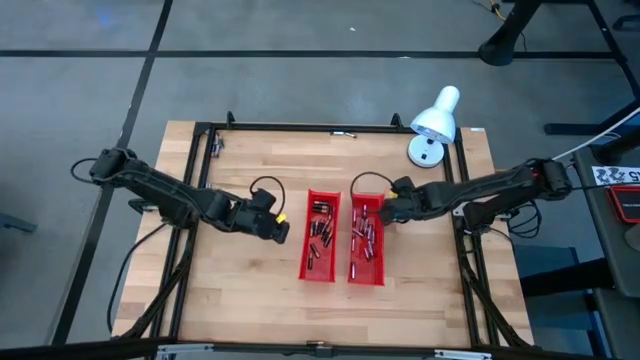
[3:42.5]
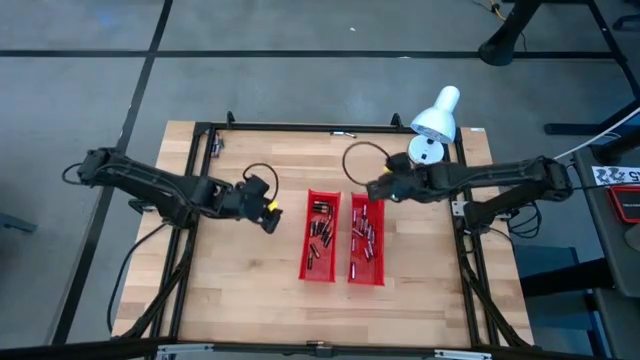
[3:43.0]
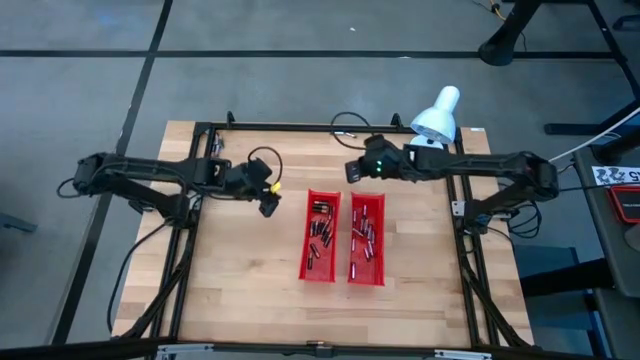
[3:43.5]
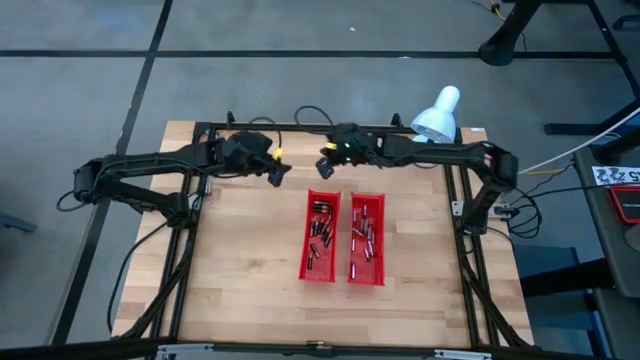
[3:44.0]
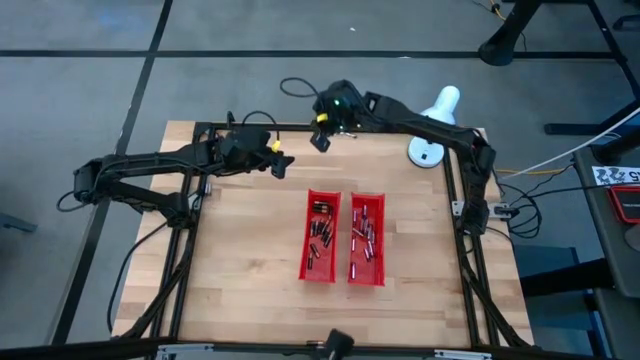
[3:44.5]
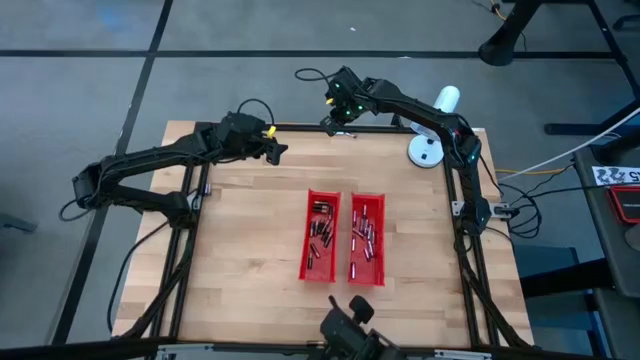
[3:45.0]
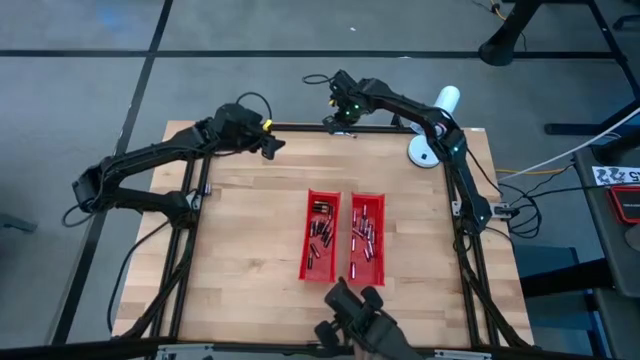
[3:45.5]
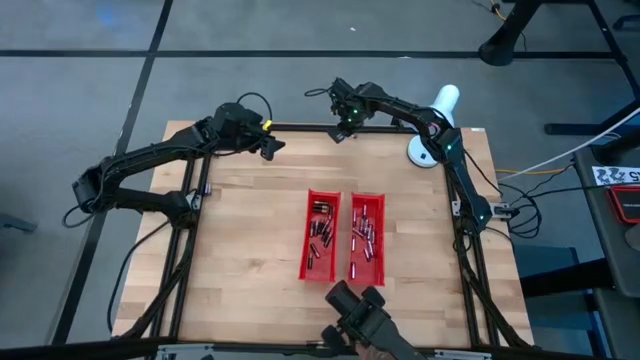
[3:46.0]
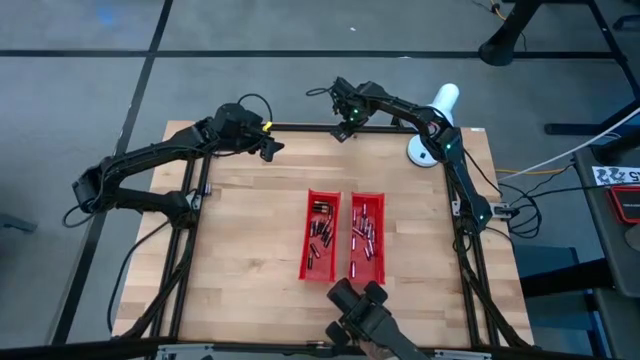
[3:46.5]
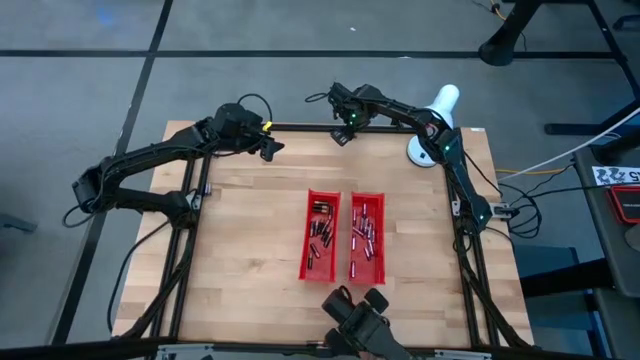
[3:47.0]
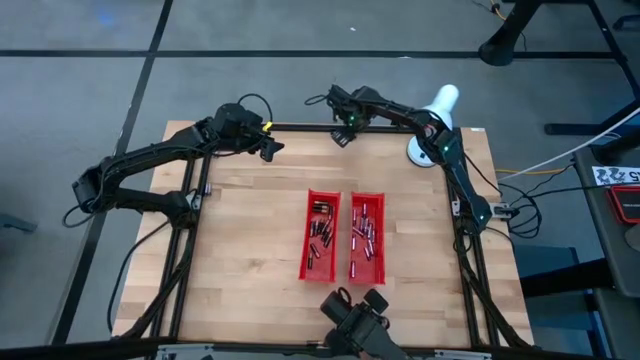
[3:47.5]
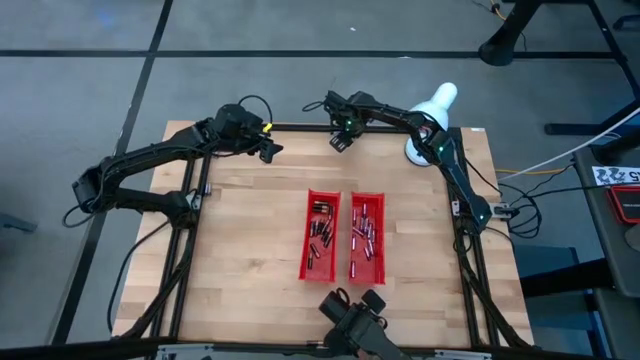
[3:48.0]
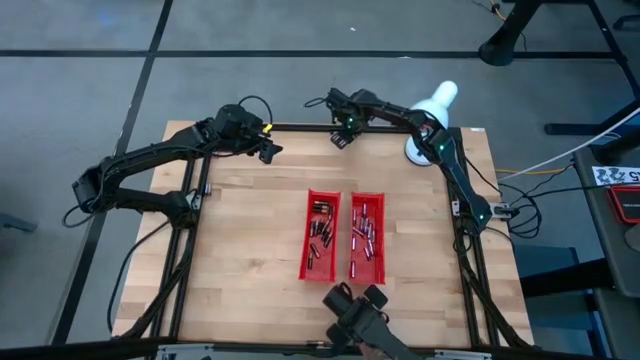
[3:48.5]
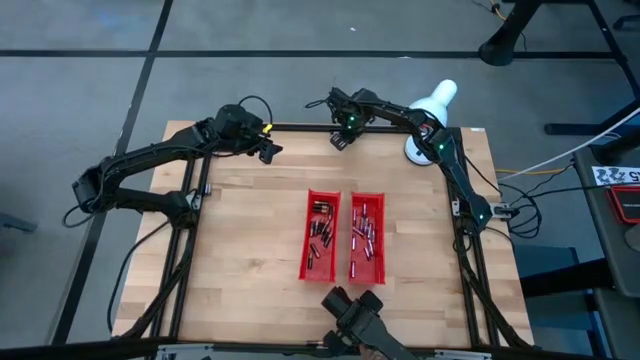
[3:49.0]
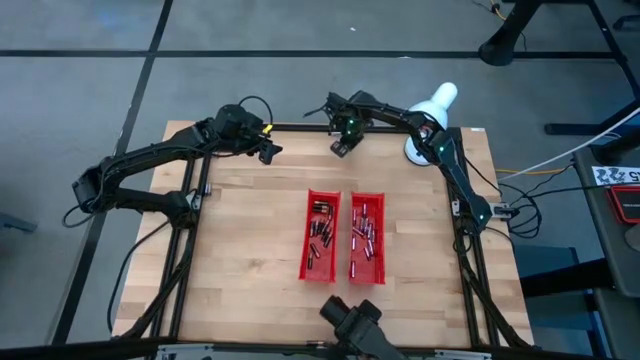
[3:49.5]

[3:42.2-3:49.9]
Task: Sort batteries
Put the silver battery into the right red bin

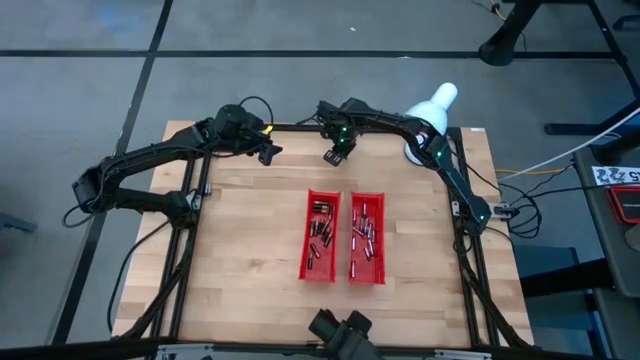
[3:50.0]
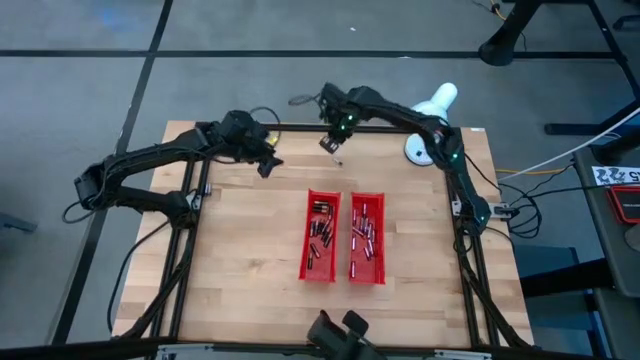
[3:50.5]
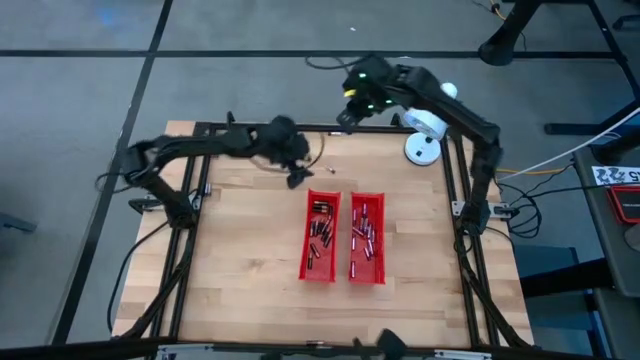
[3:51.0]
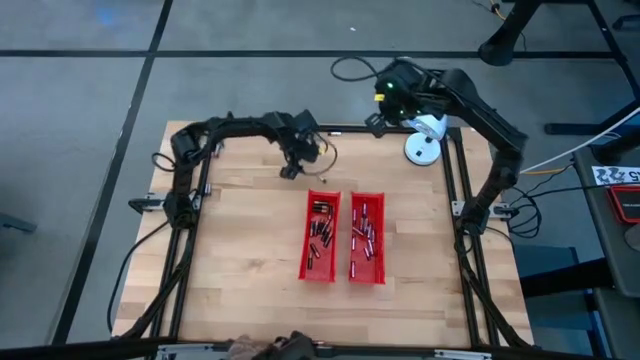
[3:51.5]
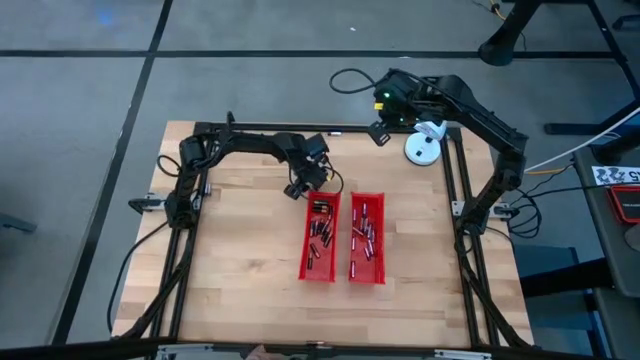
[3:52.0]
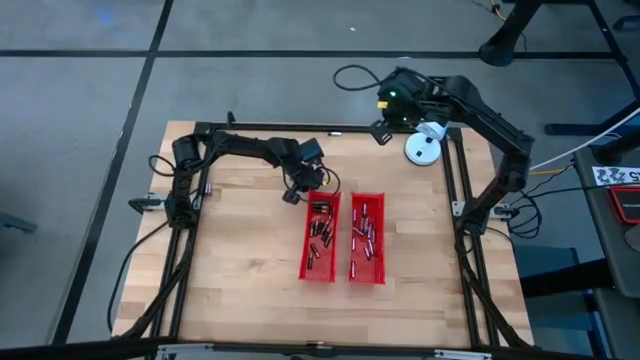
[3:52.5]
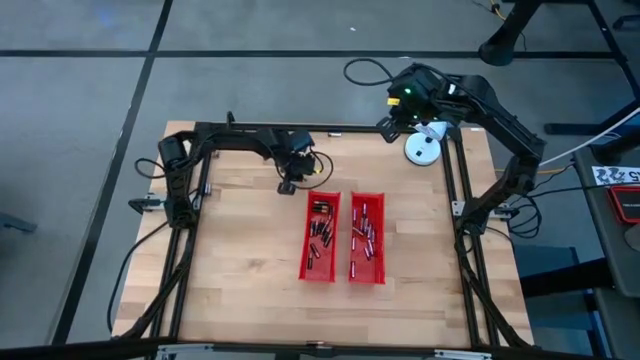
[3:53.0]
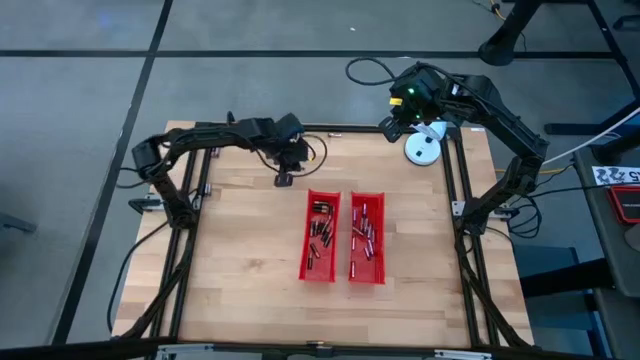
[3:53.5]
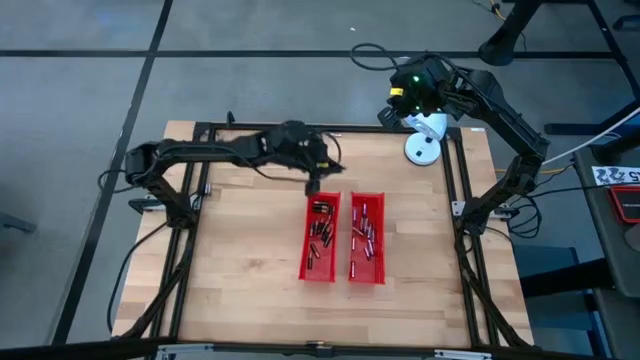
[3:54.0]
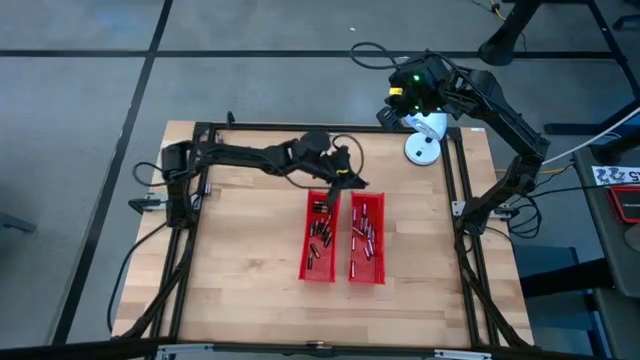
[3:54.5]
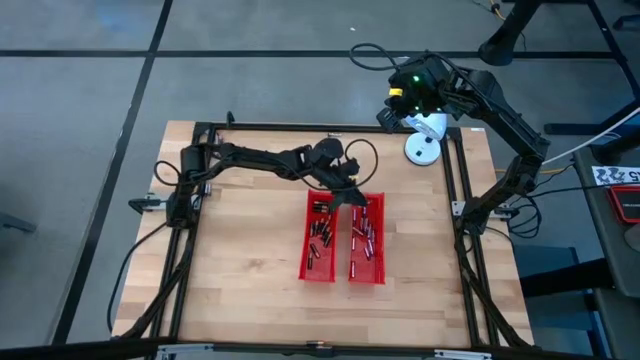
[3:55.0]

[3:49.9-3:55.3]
Put the silver battery into the right red bin

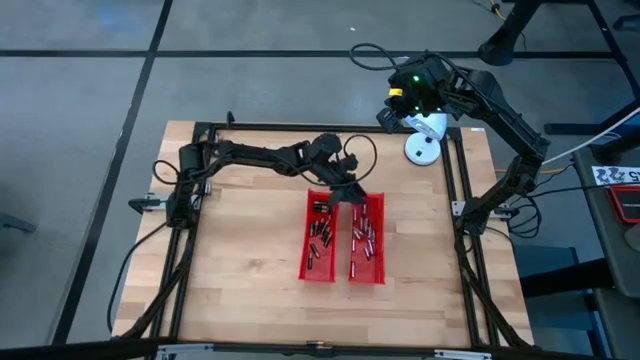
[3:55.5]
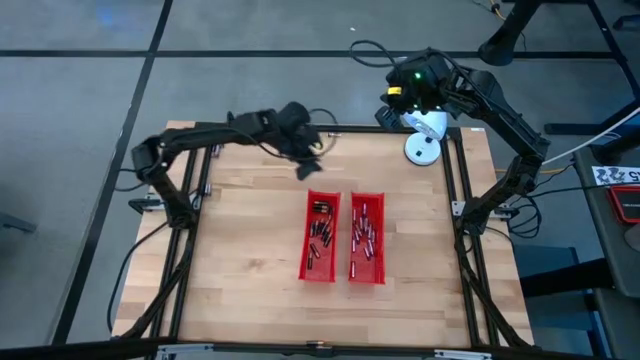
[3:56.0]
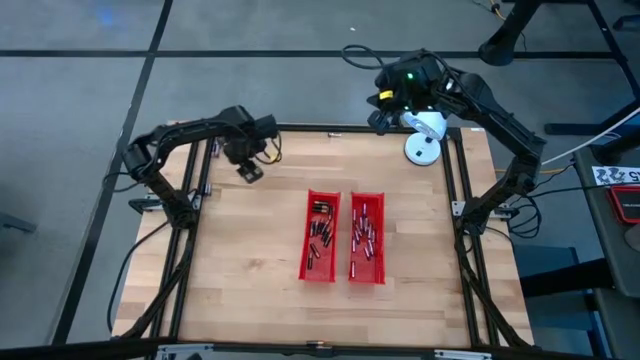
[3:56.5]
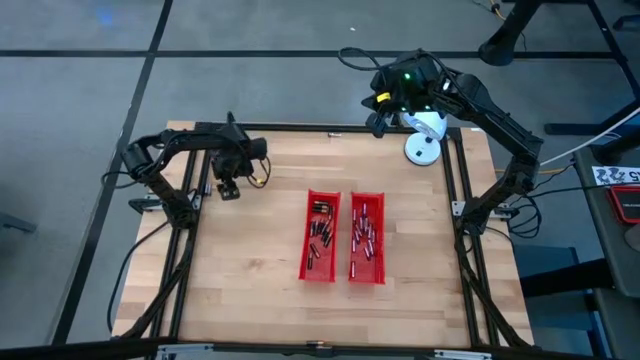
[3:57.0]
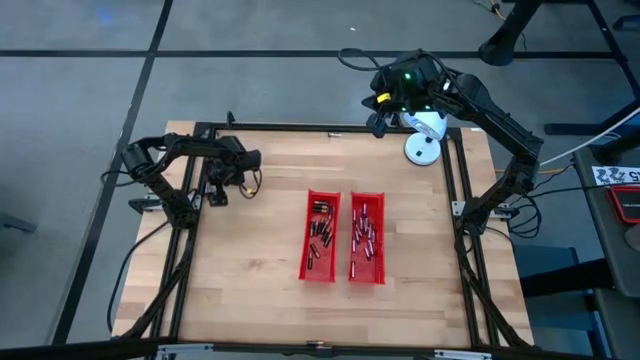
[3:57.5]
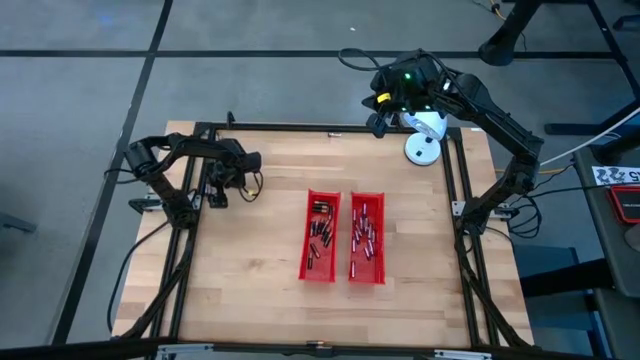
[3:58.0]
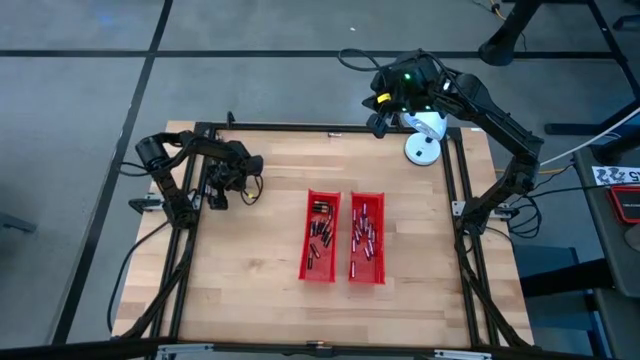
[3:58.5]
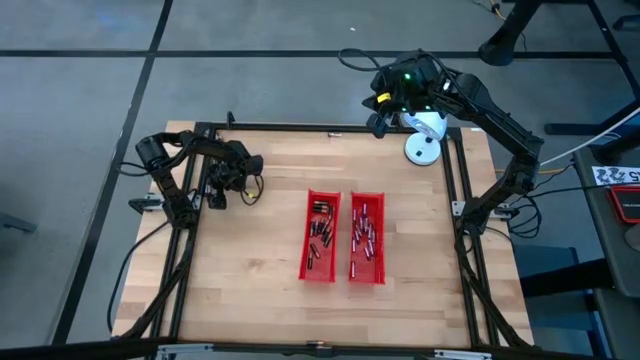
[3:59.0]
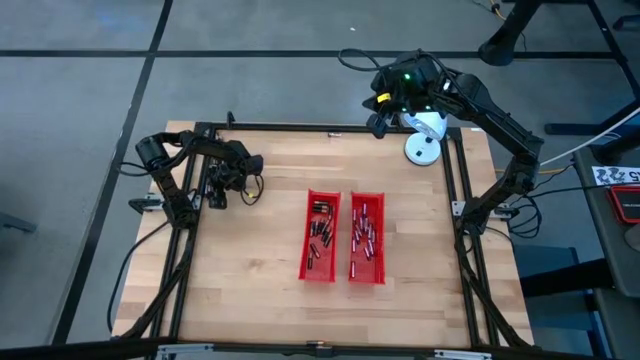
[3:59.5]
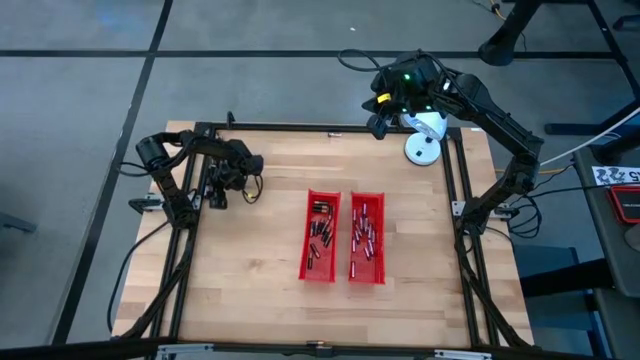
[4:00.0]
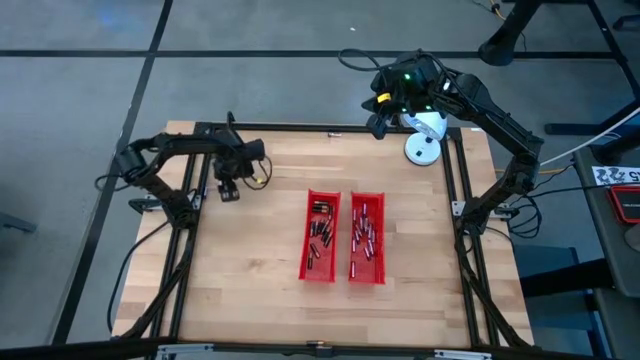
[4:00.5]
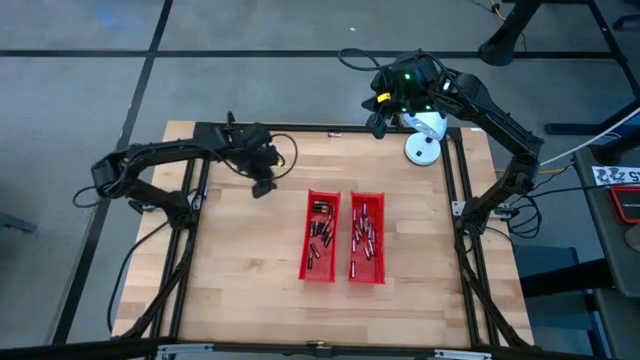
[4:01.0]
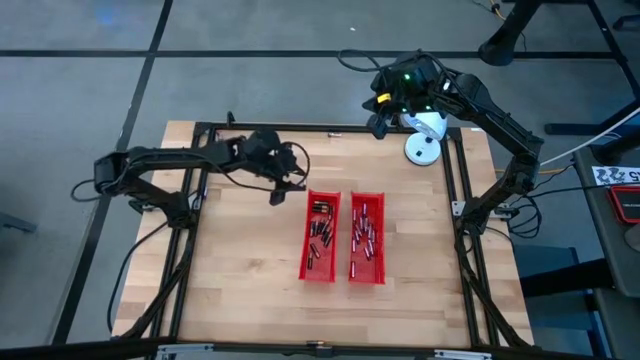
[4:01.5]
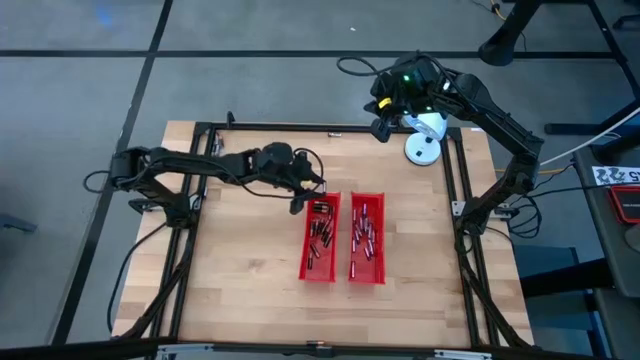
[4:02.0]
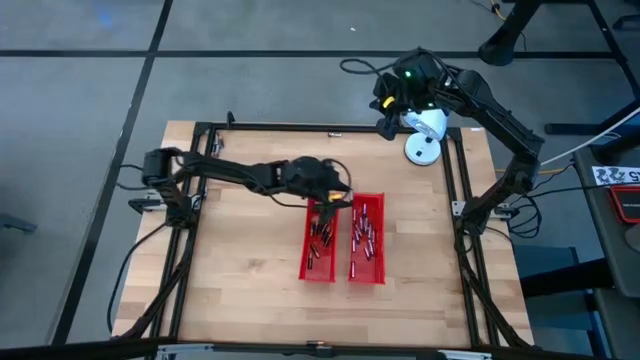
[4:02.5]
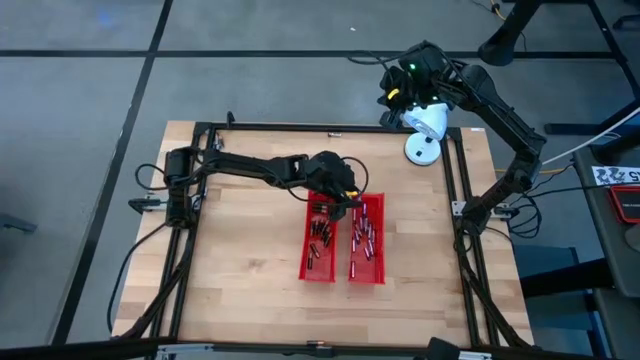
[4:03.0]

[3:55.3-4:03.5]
Put the silver battery into the right red bin

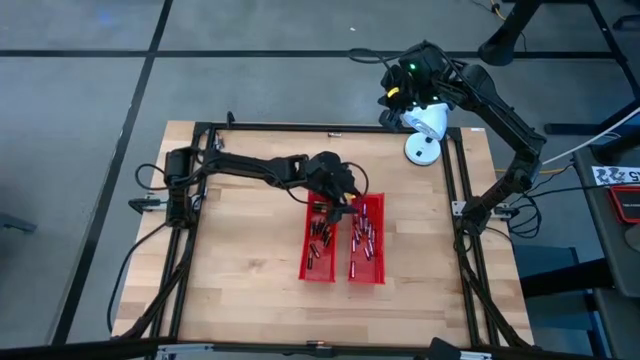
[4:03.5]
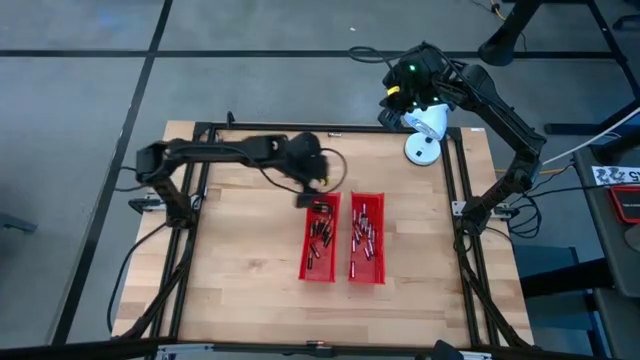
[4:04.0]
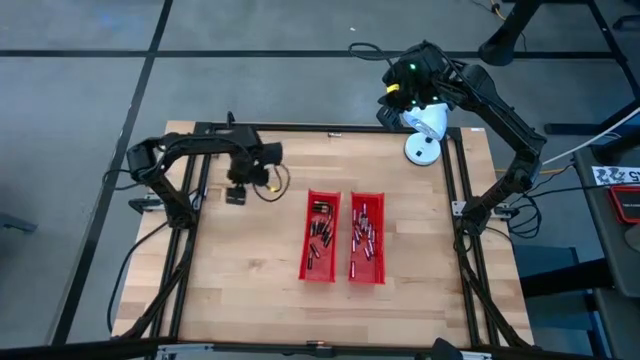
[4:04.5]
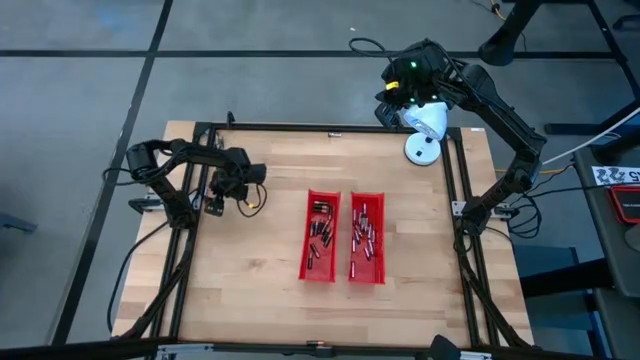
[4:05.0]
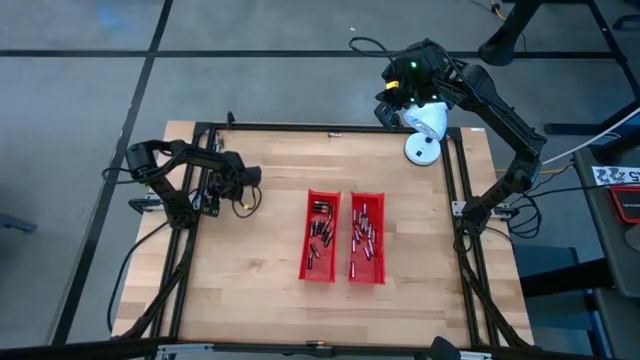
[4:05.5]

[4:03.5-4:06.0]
Put the silver battery into the right red bin
